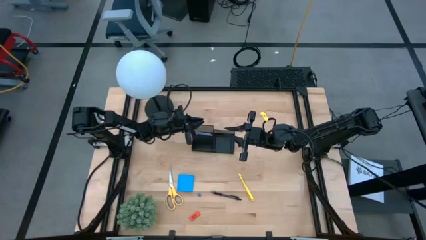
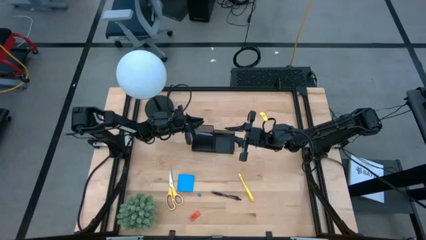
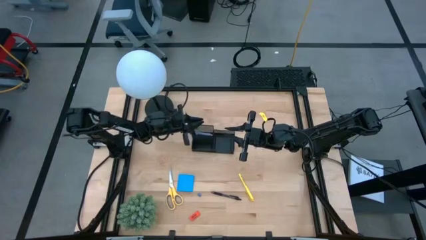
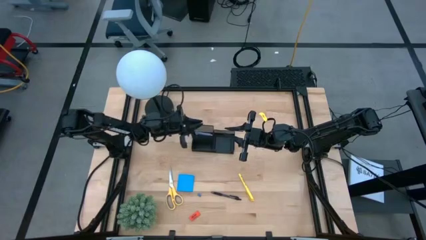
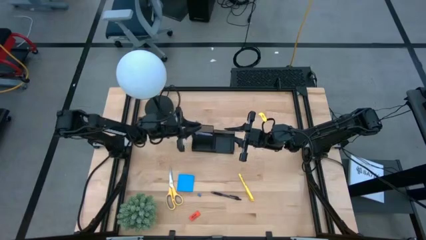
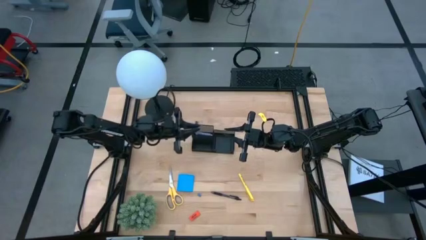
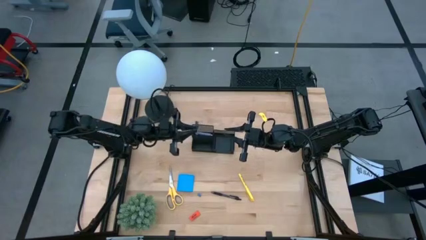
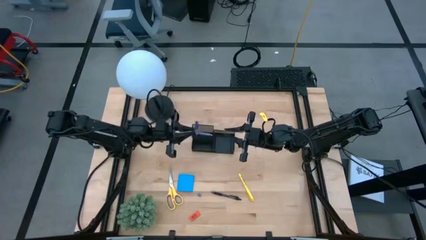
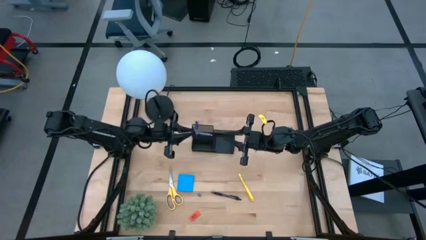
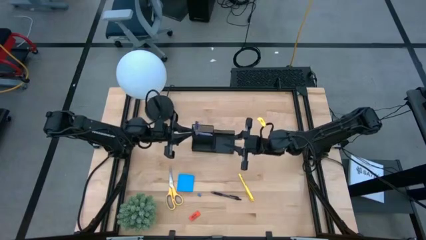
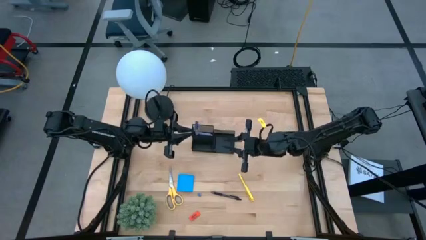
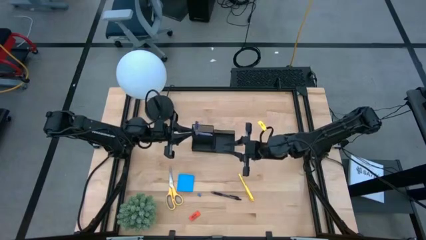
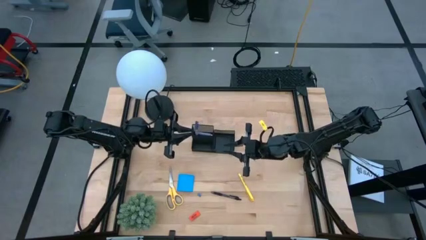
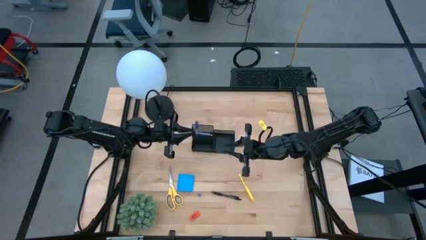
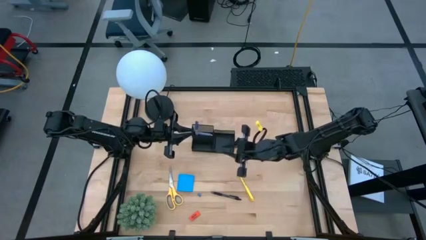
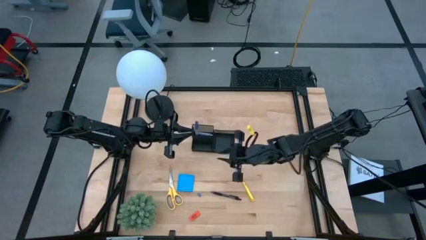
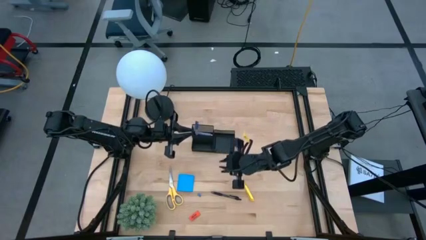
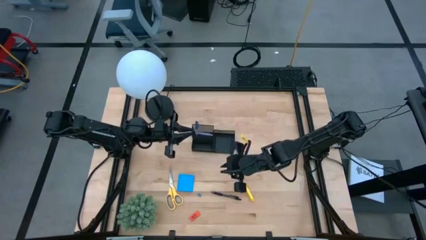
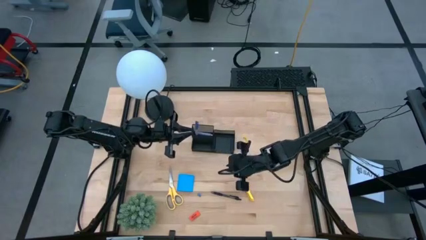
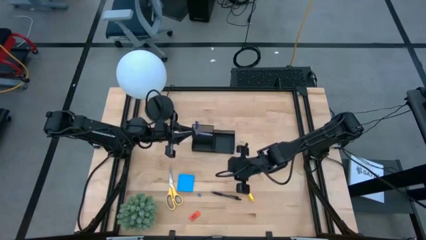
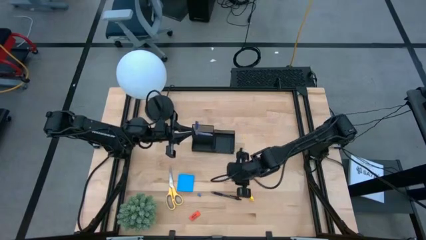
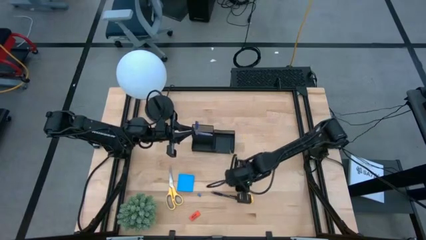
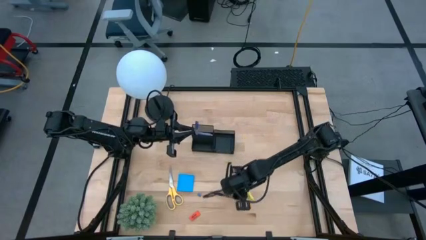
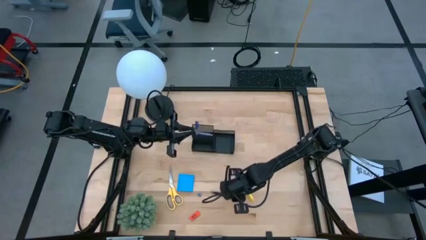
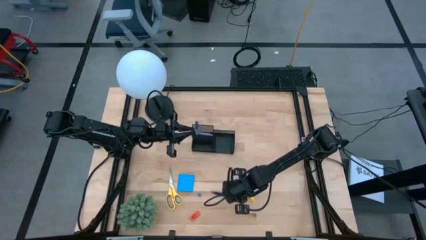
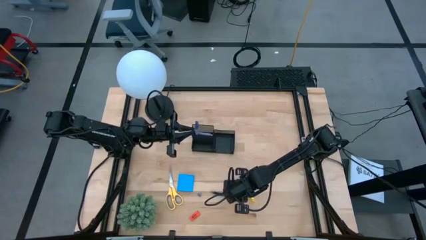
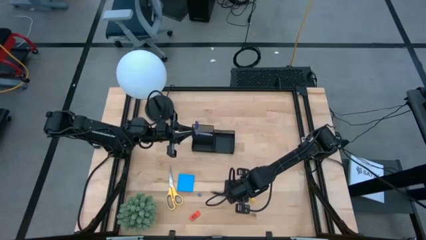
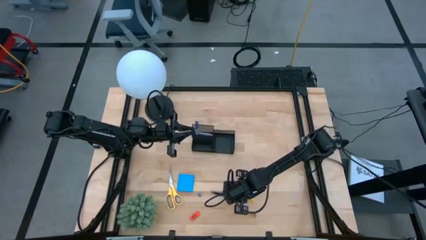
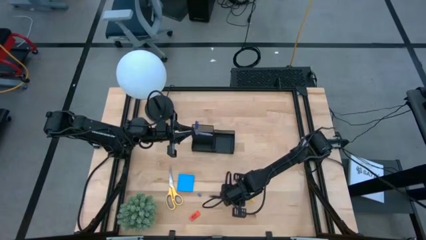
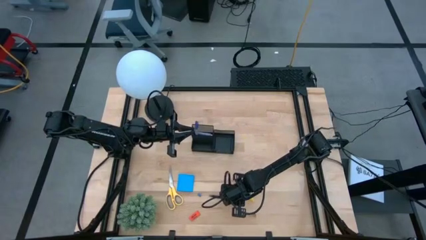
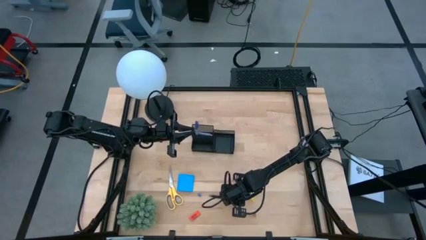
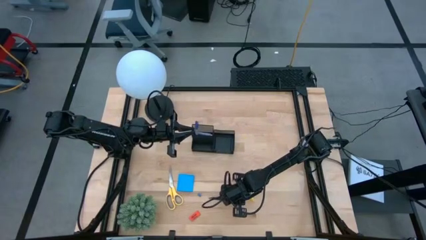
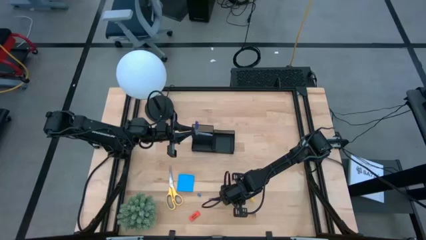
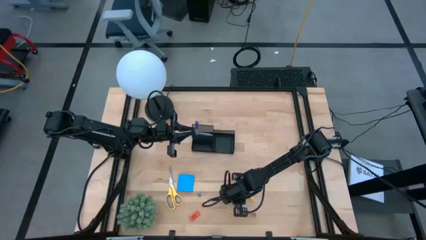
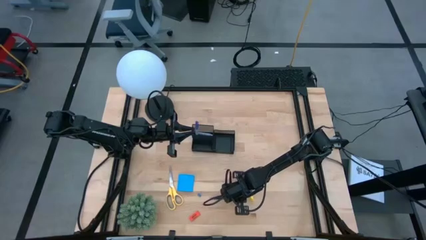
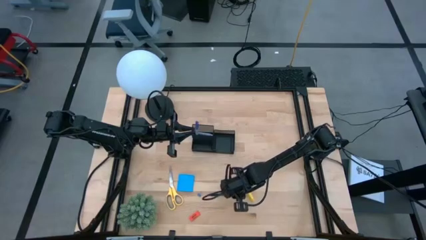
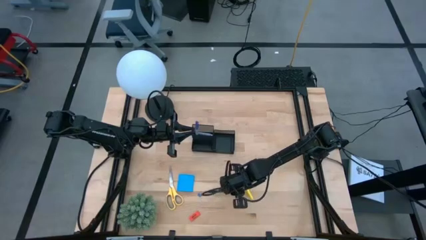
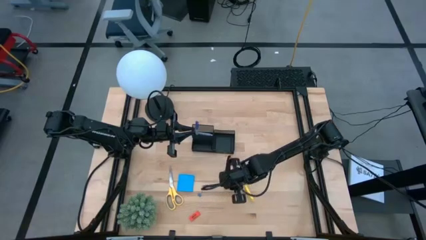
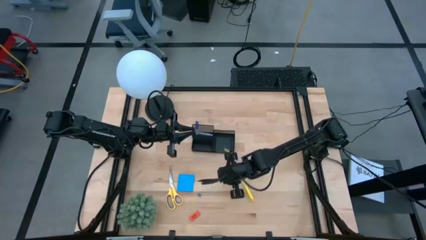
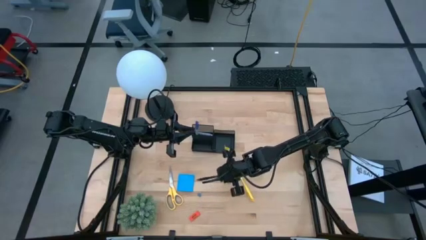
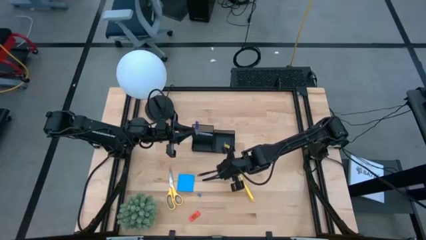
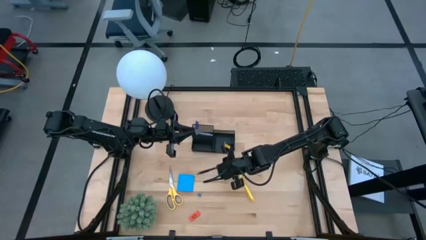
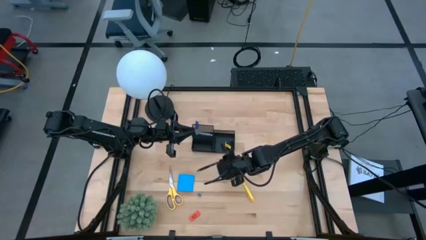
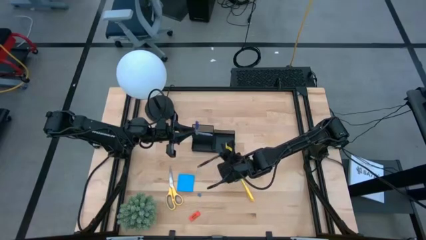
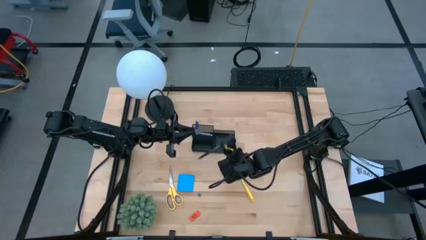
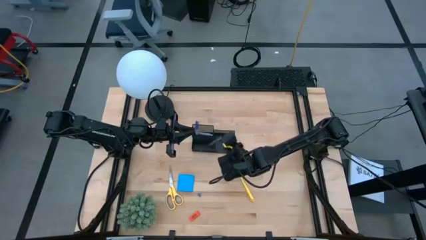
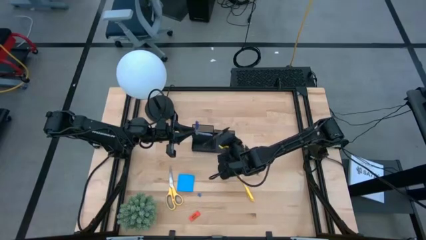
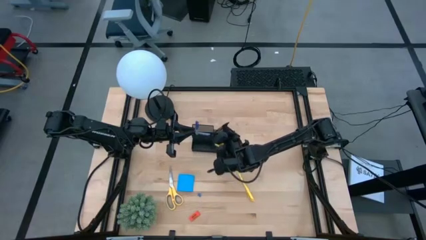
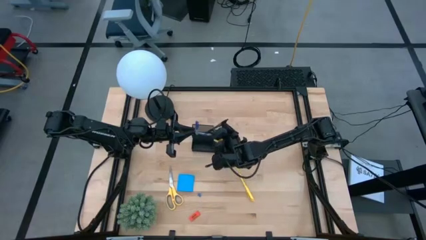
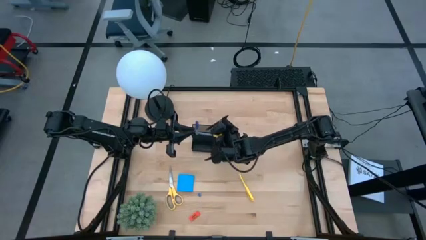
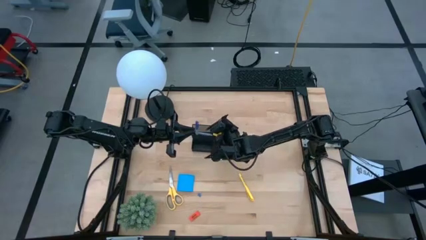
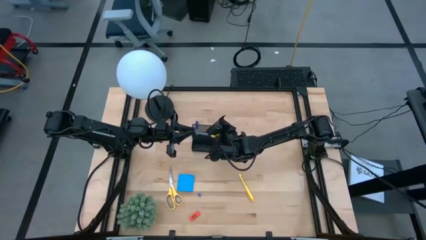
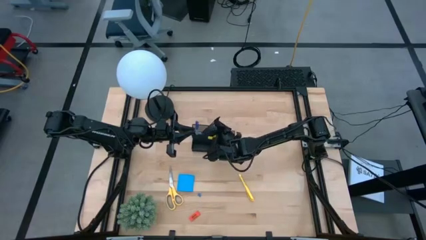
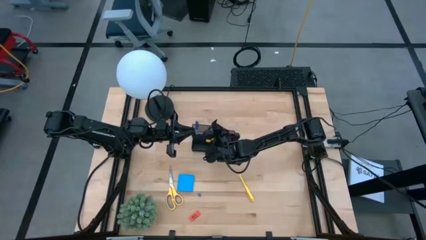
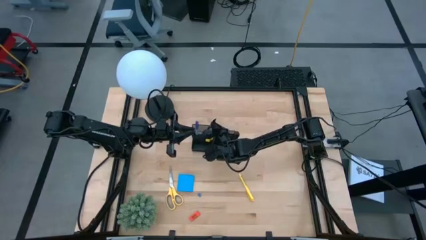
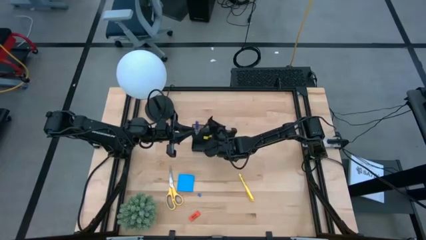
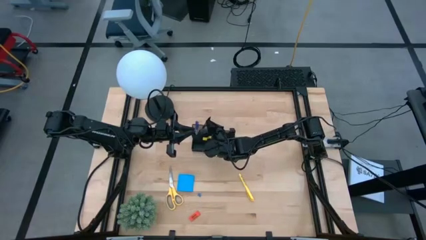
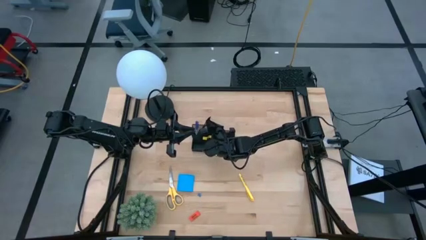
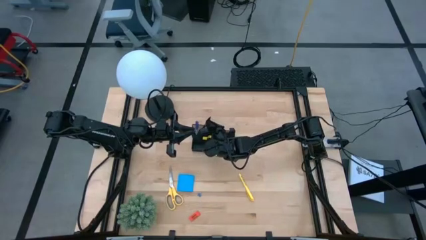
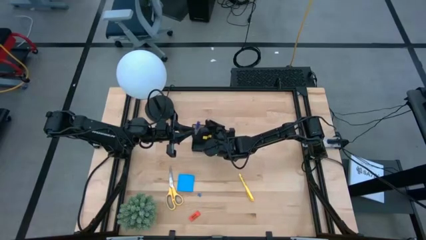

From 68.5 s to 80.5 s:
Task: Pick and place office supplies into organizer
Put the black pen into the black desk organizer
